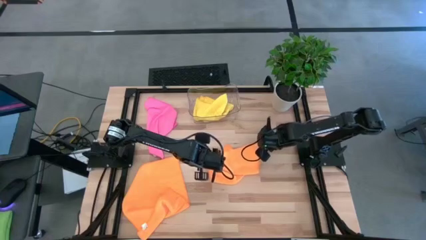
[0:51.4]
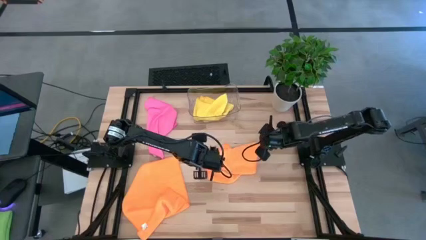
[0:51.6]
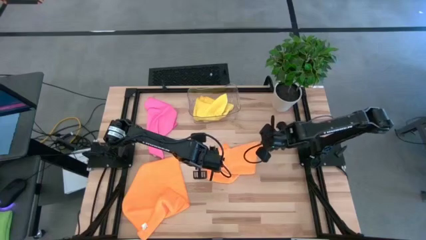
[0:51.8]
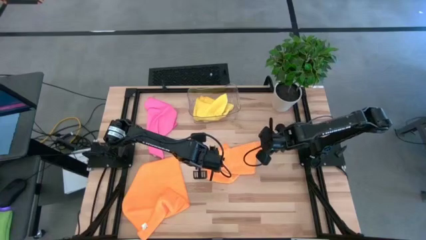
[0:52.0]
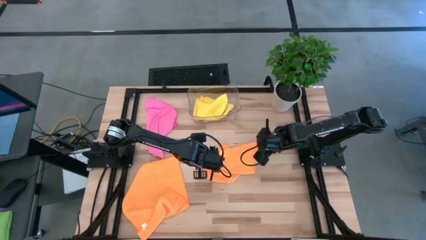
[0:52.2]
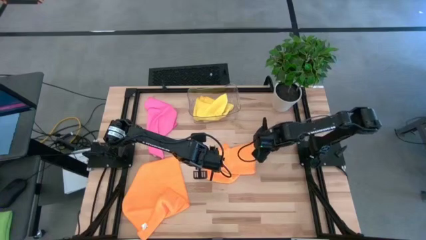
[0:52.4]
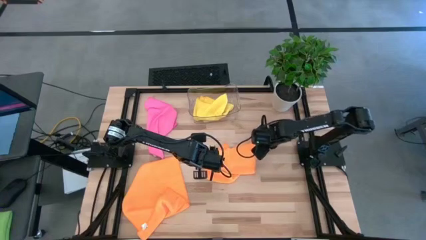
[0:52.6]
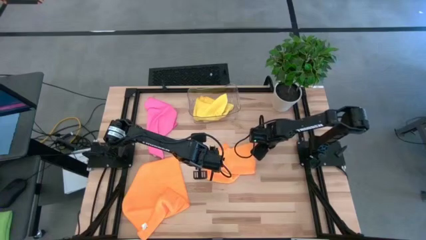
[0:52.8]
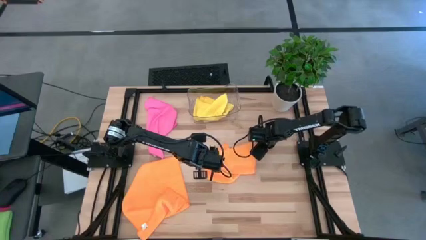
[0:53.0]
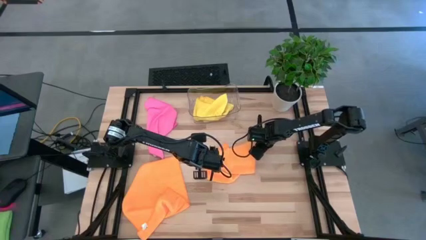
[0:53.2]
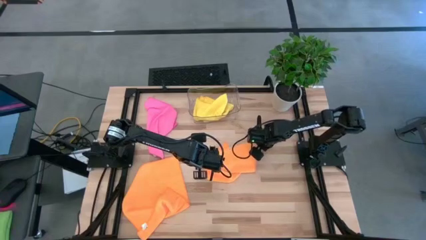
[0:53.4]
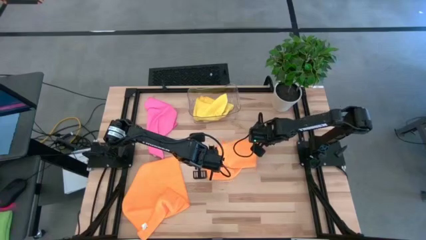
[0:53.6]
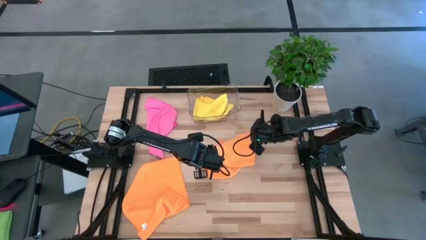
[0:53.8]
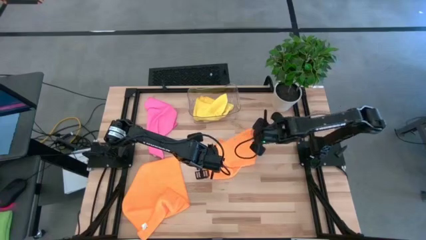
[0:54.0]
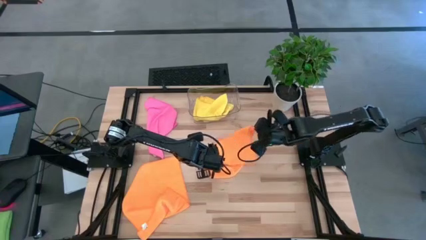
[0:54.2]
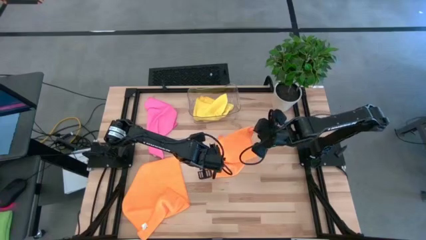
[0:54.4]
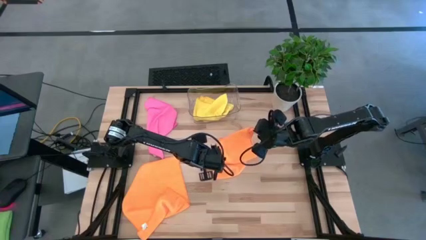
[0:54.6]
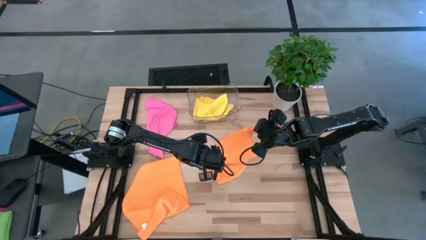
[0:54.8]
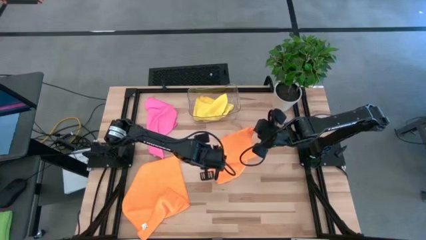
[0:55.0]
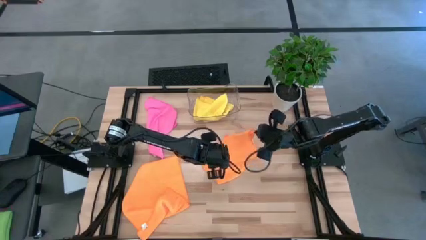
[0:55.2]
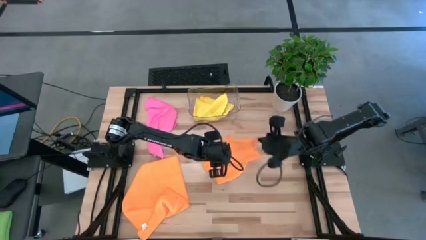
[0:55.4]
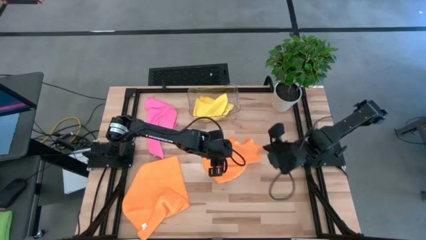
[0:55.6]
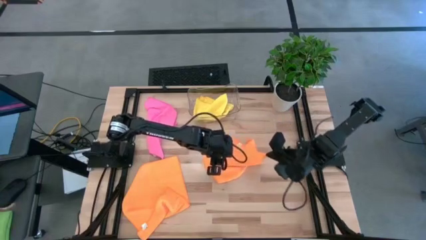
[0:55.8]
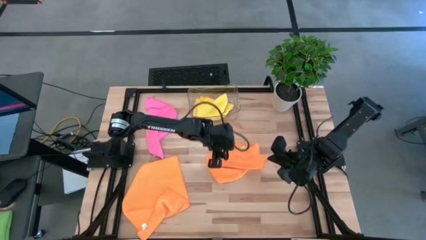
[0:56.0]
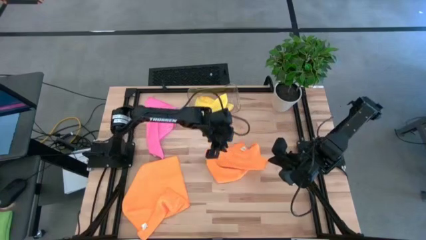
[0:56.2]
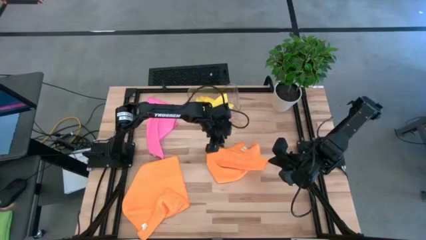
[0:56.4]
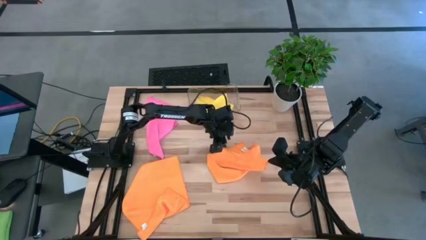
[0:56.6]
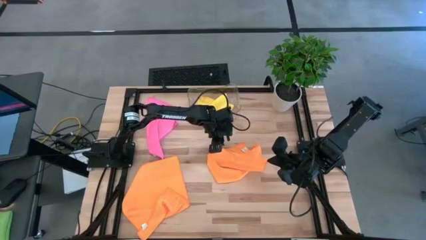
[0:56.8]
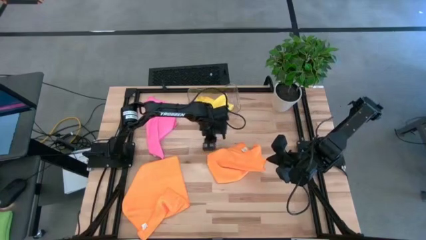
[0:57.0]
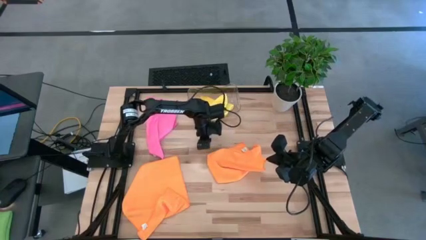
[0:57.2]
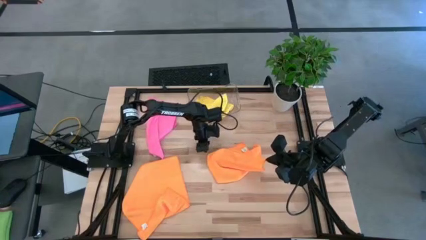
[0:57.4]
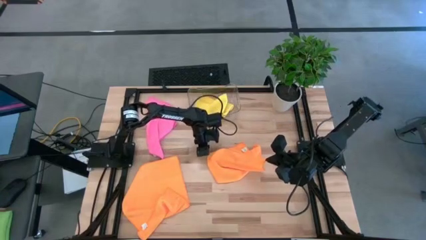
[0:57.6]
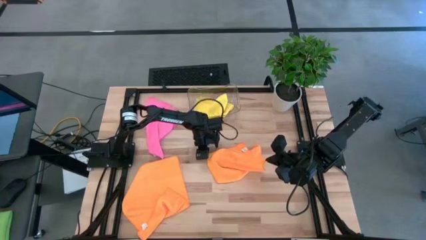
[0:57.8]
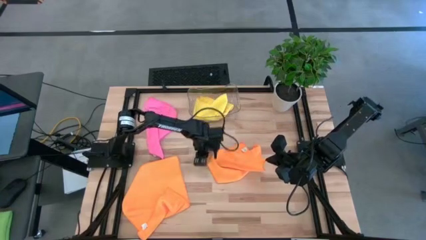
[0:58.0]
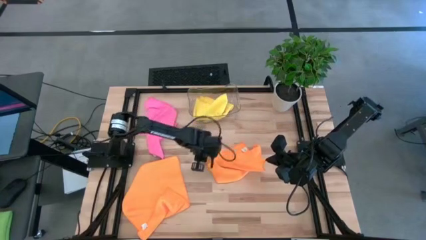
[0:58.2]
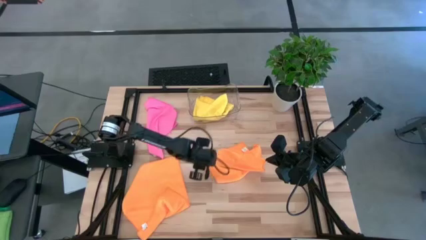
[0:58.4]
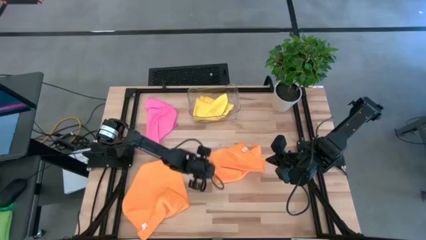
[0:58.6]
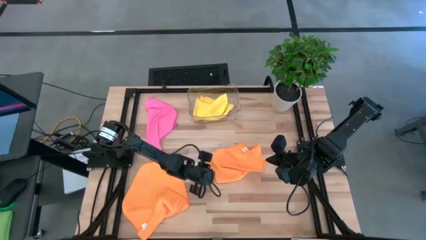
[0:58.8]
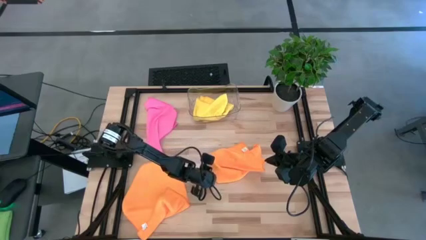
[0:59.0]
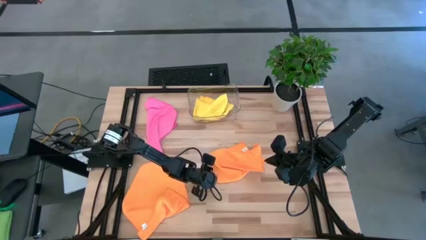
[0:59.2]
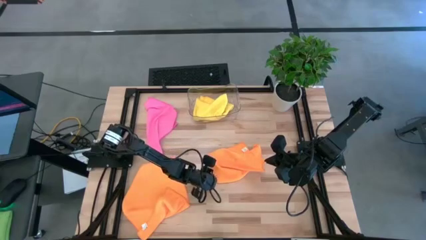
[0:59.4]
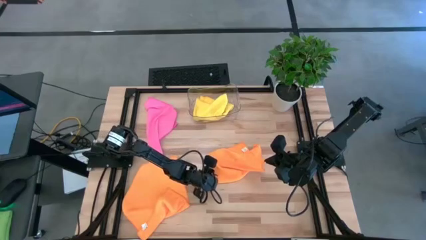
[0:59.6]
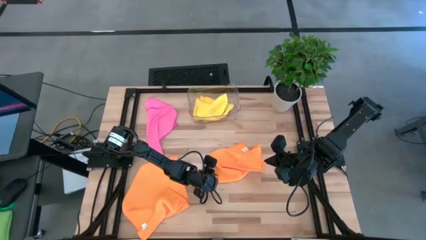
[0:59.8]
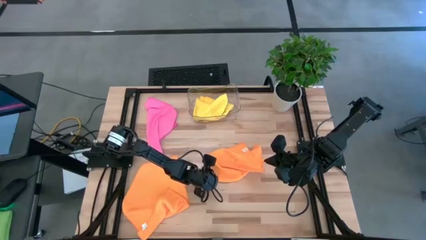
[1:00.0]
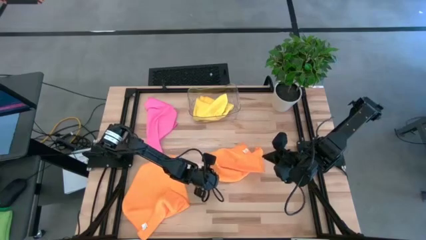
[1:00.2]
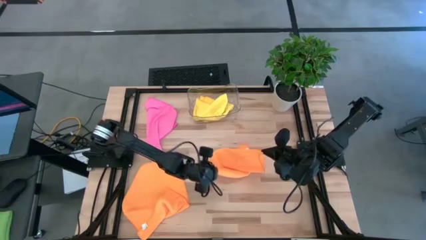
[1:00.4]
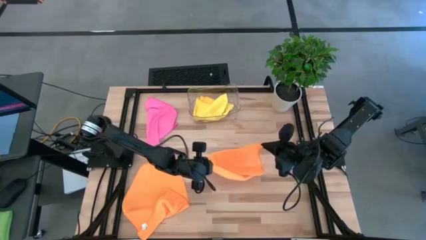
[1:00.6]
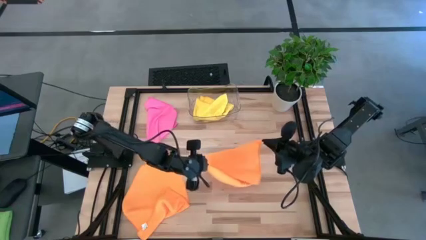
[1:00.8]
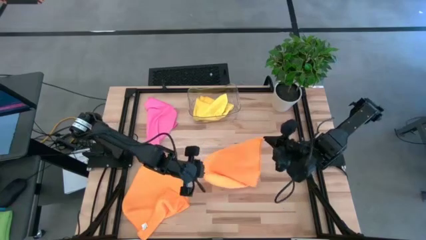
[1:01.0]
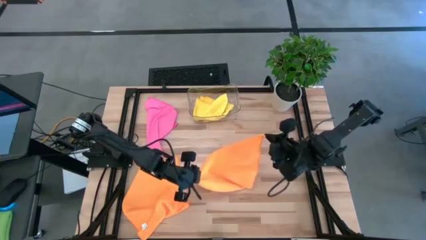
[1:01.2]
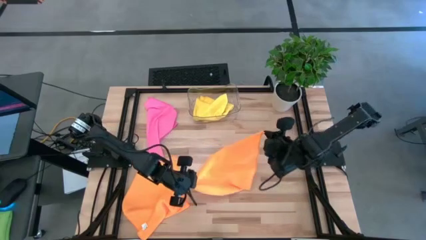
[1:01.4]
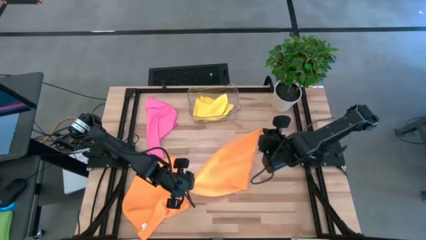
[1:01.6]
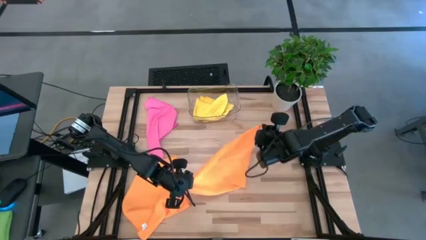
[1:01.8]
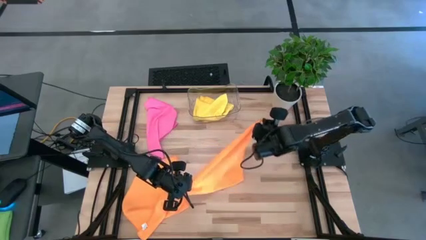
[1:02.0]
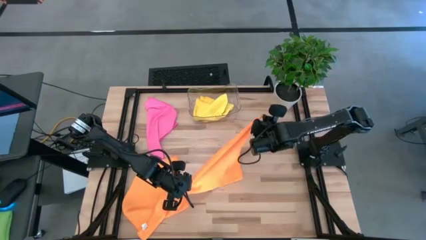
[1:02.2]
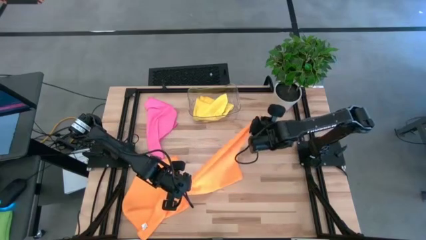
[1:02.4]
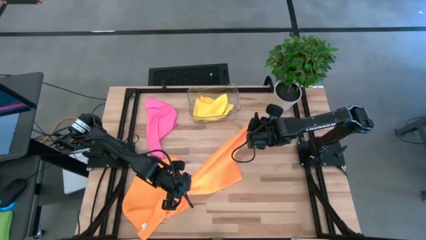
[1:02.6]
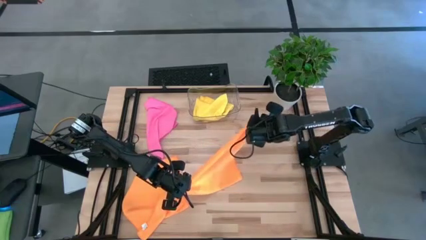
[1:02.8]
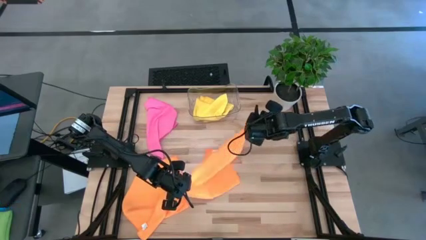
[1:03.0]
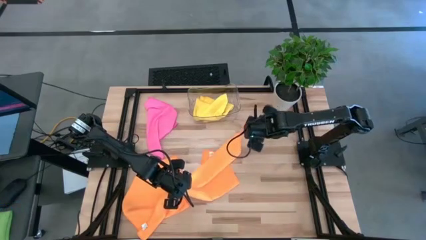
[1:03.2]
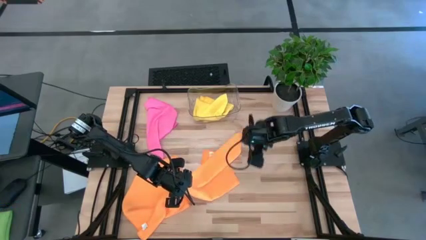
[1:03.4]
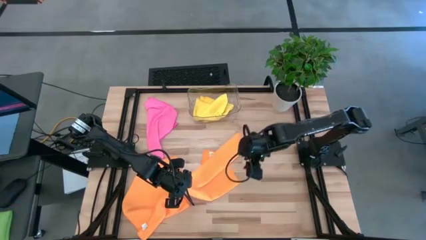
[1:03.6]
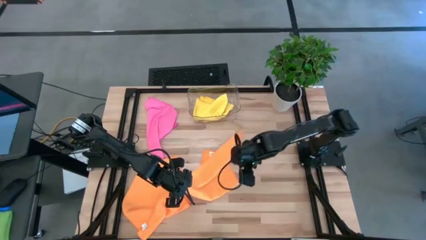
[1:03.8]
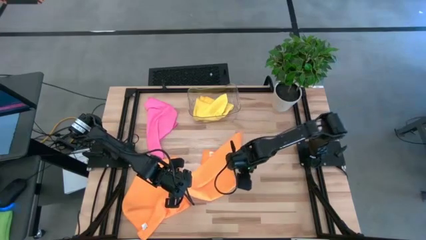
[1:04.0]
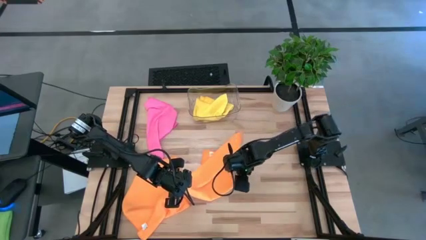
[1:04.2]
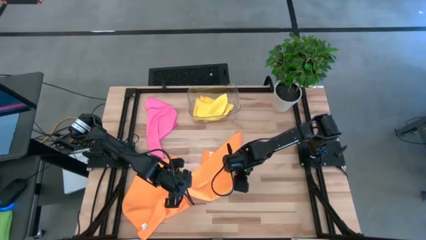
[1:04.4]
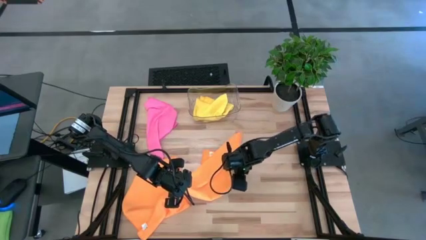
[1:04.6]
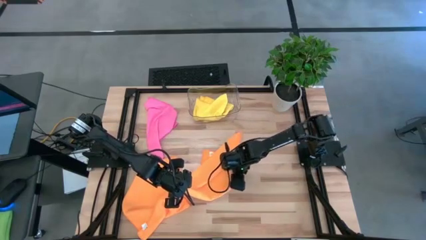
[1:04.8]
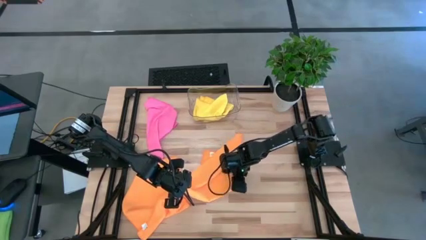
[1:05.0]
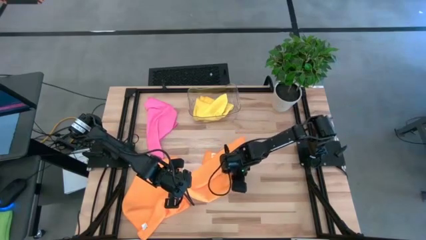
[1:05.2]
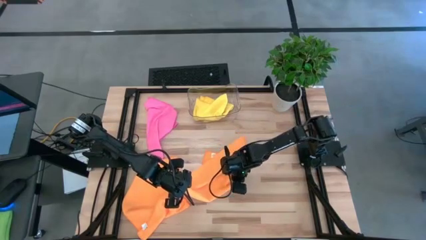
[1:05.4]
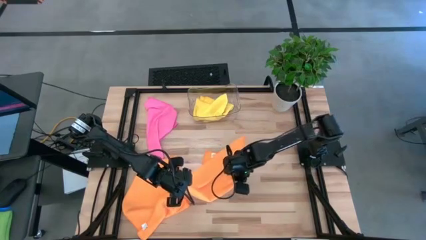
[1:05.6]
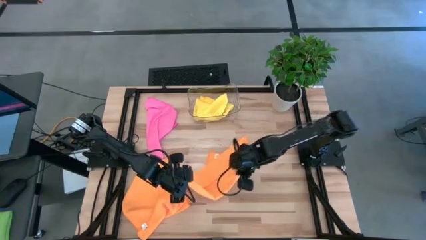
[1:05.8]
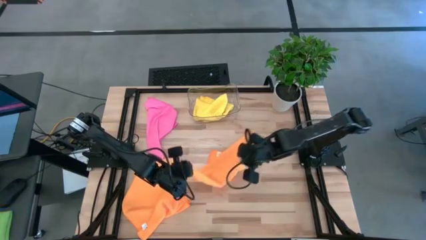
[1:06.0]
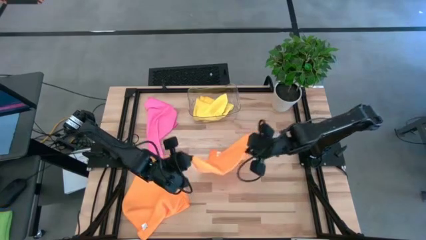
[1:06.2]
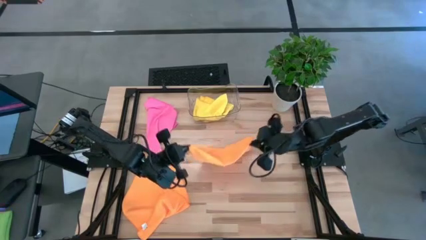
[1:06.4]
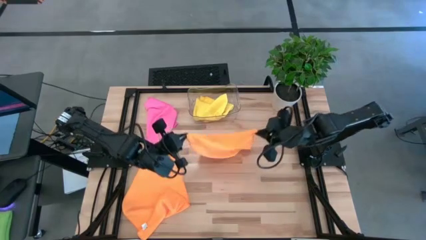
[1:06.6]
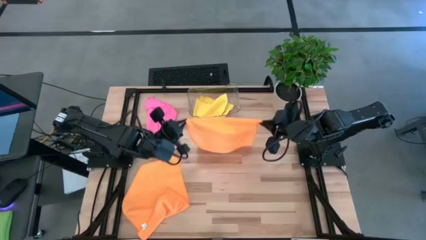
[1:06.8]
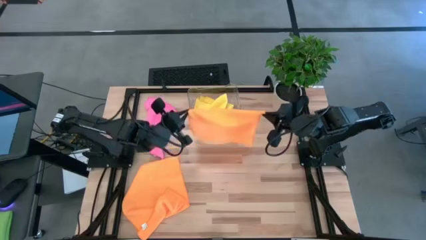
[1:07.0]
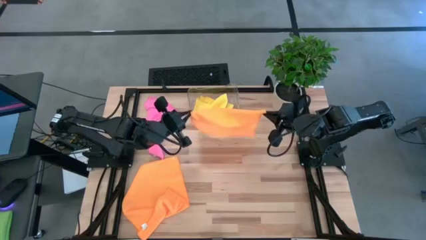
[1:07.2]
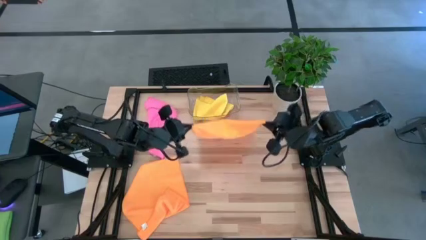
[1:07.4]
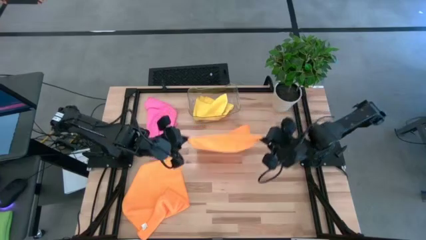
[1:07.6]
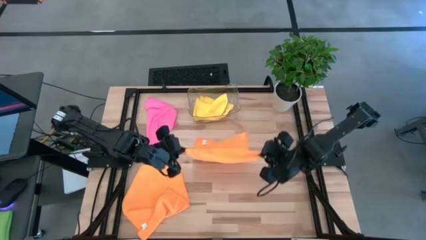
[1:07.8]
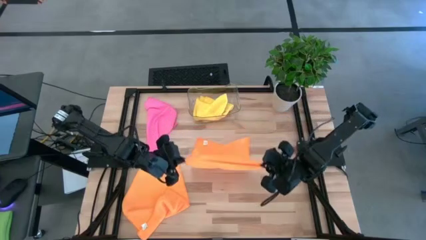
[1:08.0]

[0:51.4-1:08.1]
Task: Fold microfiber towels
Fold the right orange towel
